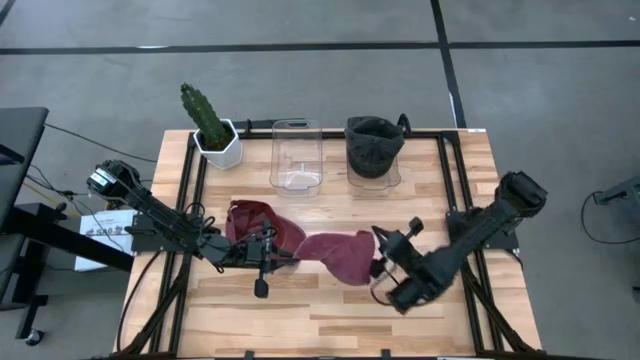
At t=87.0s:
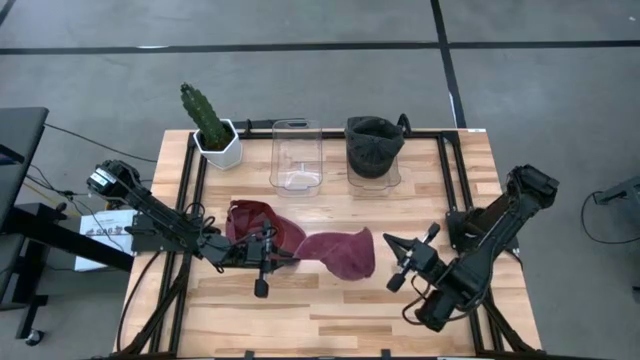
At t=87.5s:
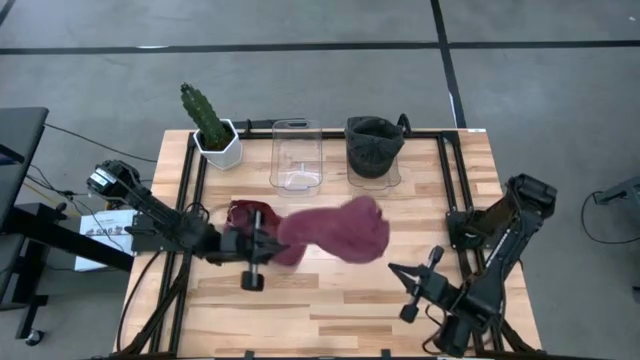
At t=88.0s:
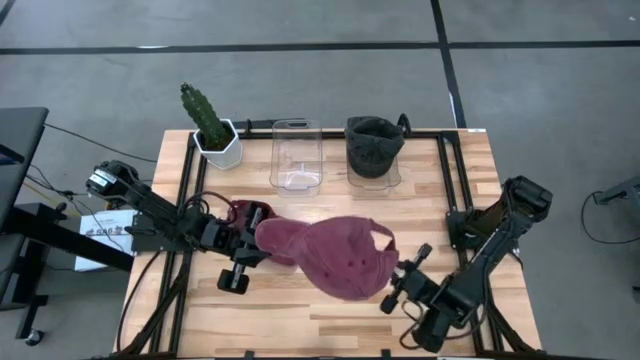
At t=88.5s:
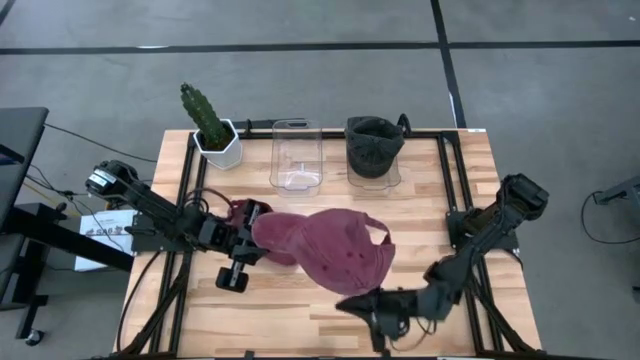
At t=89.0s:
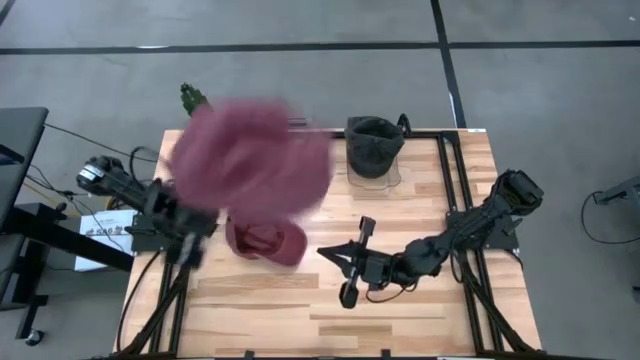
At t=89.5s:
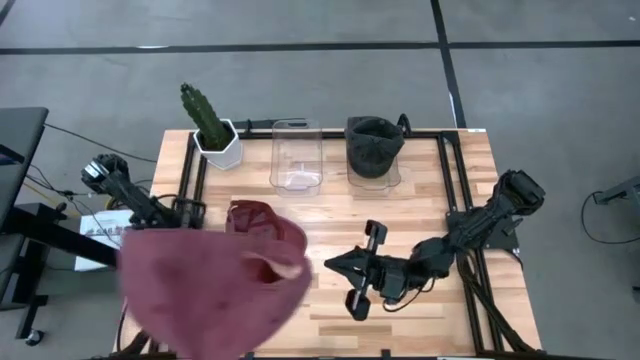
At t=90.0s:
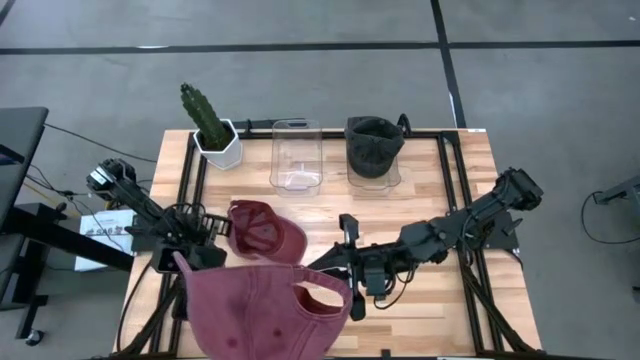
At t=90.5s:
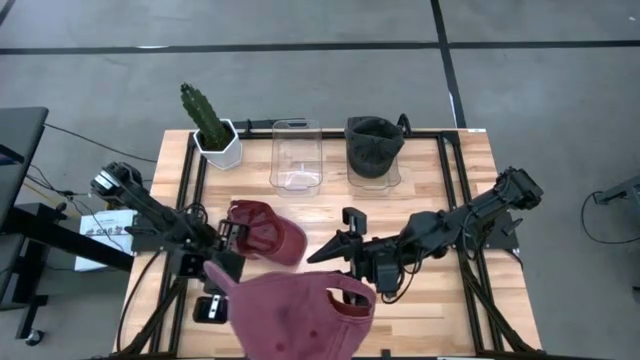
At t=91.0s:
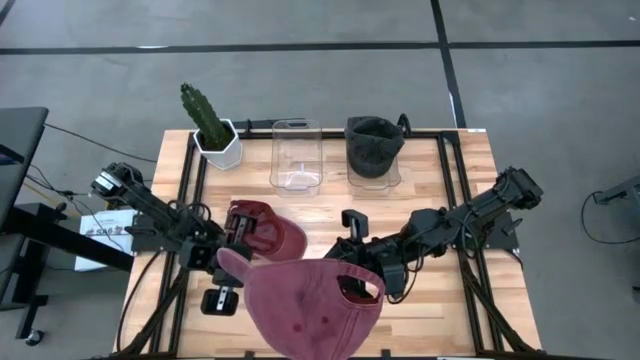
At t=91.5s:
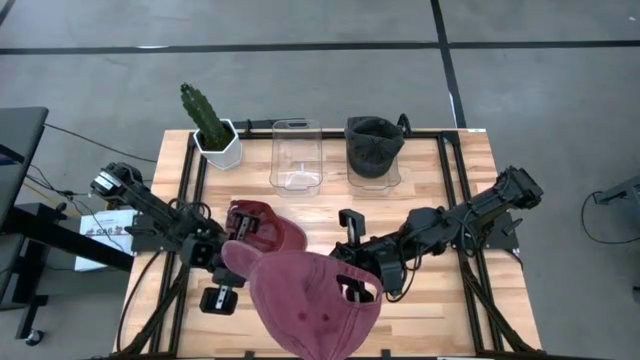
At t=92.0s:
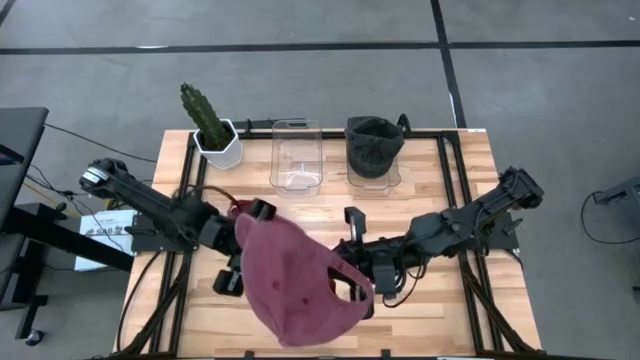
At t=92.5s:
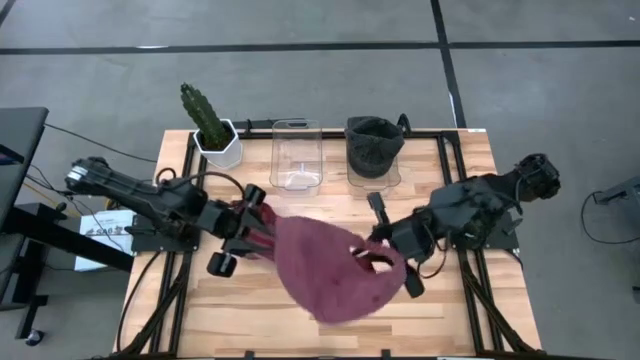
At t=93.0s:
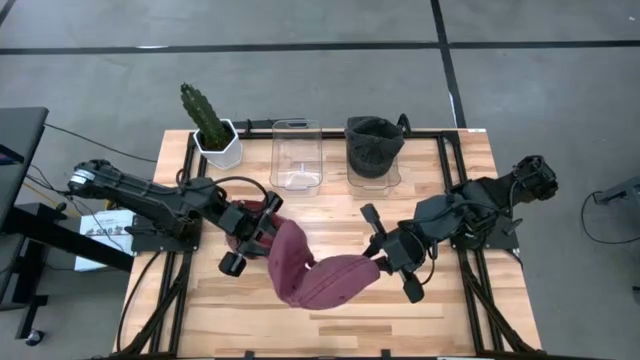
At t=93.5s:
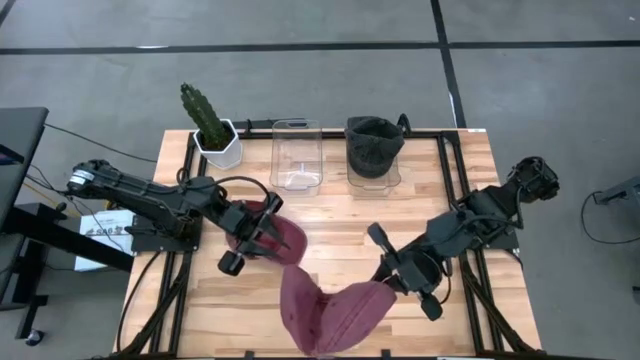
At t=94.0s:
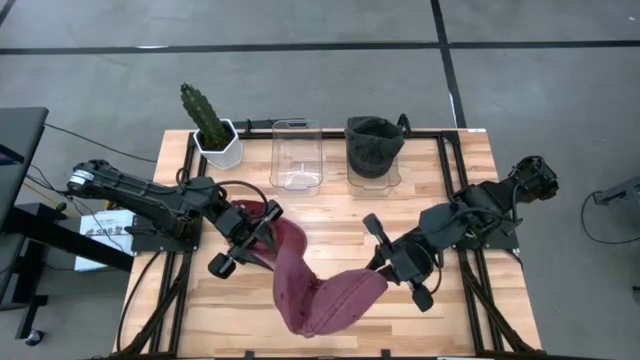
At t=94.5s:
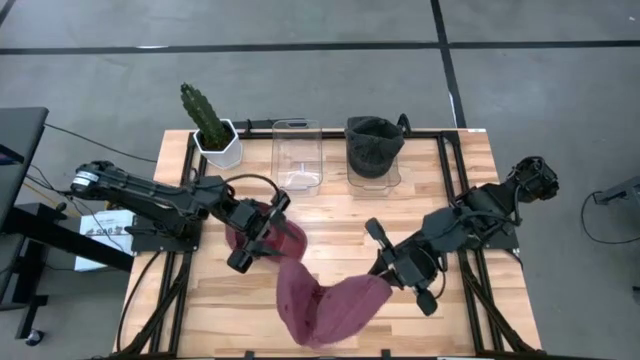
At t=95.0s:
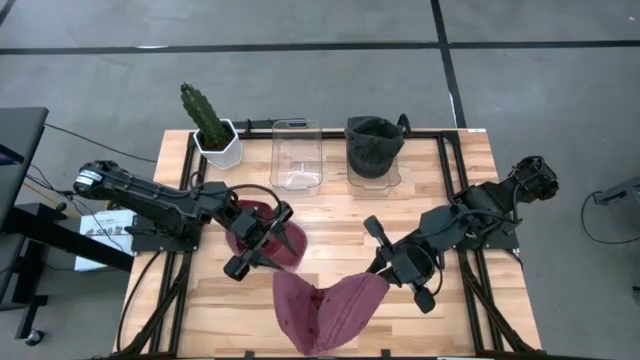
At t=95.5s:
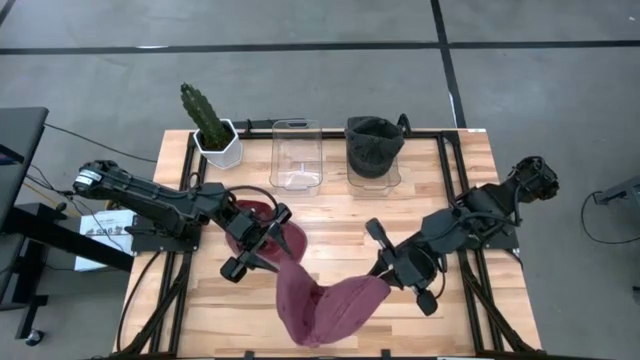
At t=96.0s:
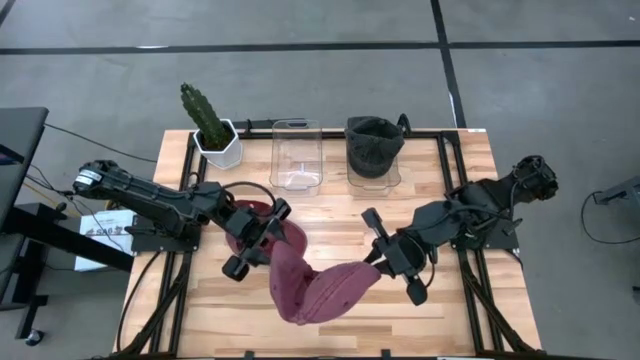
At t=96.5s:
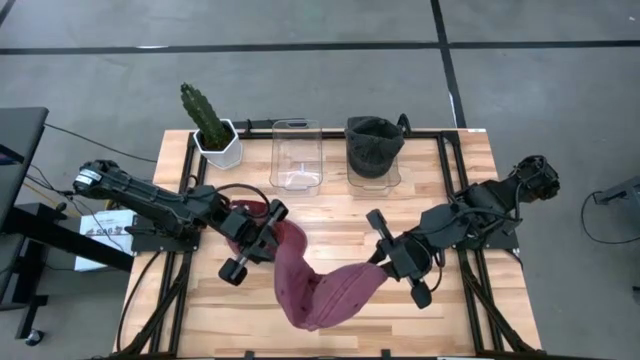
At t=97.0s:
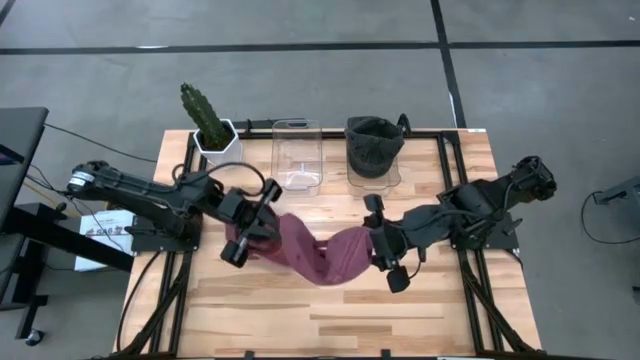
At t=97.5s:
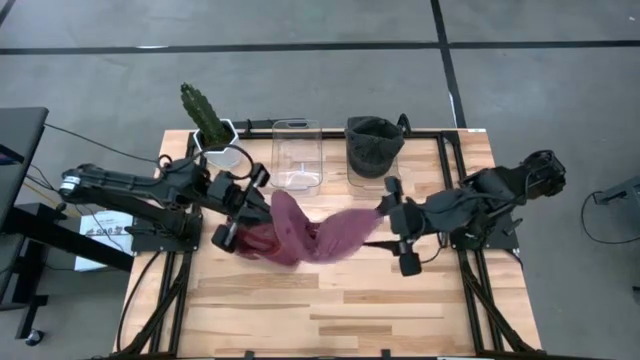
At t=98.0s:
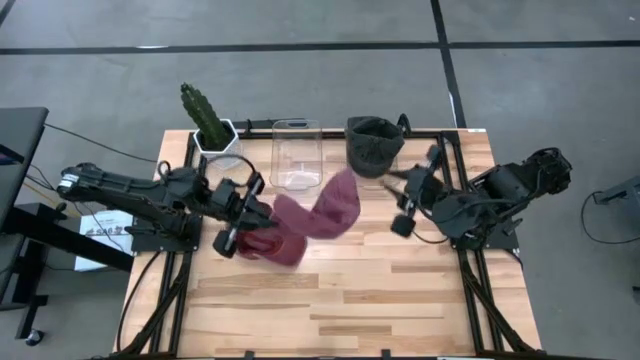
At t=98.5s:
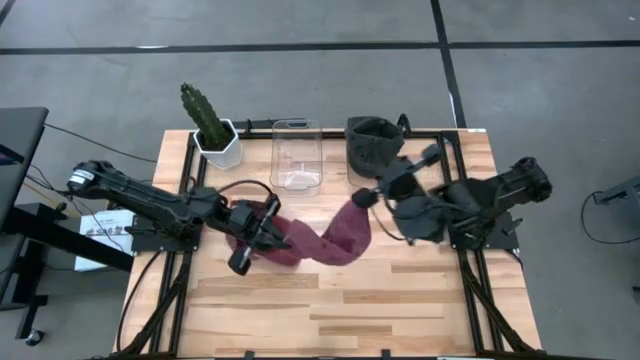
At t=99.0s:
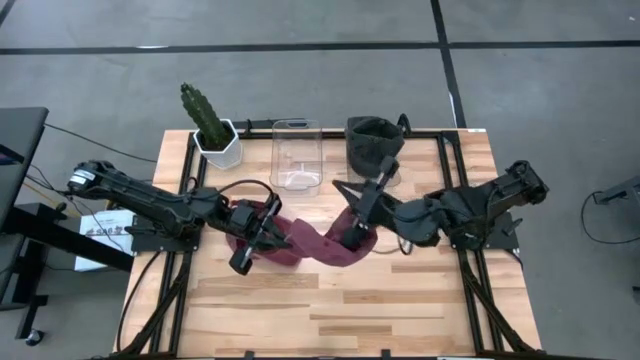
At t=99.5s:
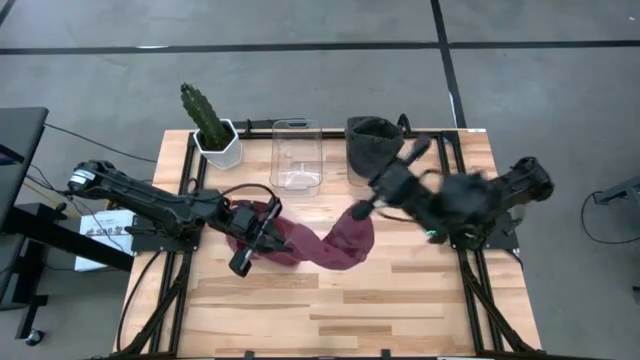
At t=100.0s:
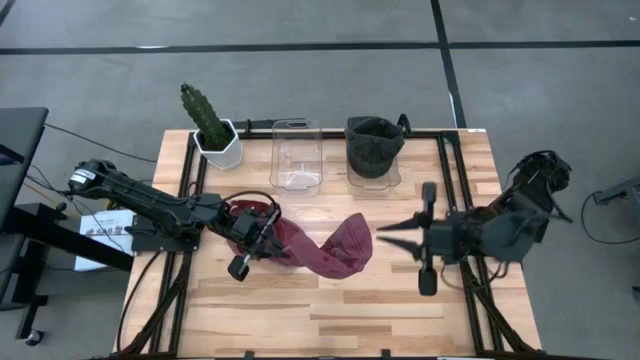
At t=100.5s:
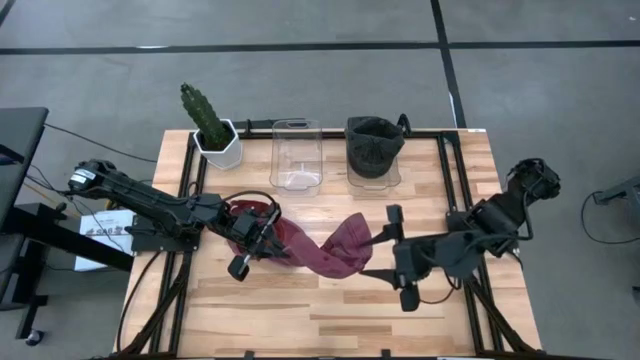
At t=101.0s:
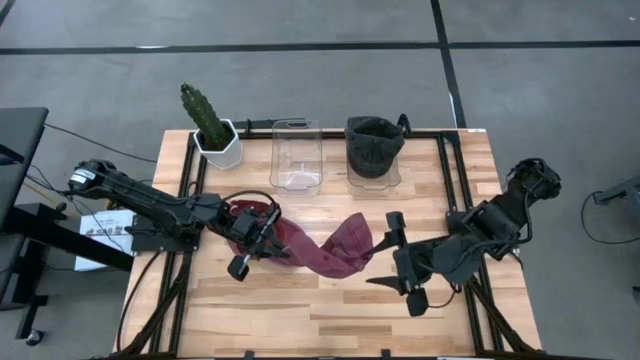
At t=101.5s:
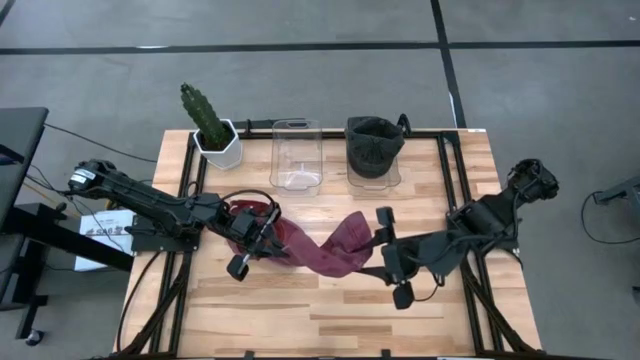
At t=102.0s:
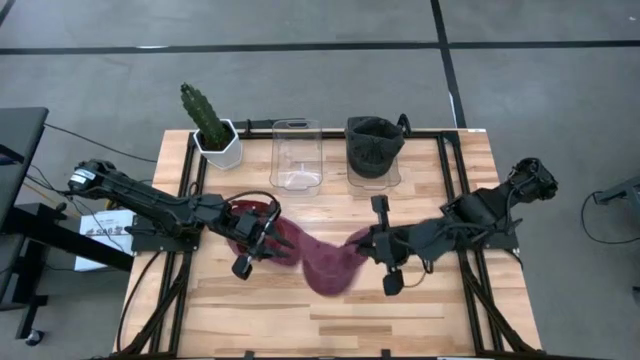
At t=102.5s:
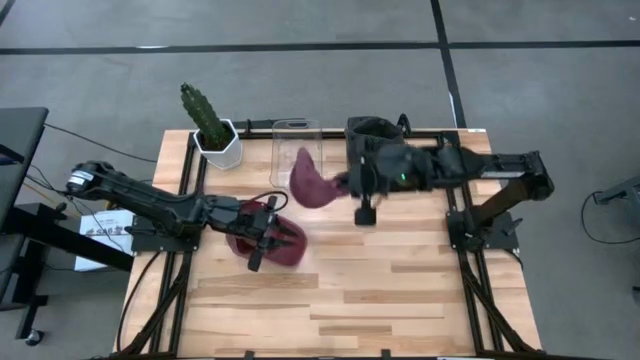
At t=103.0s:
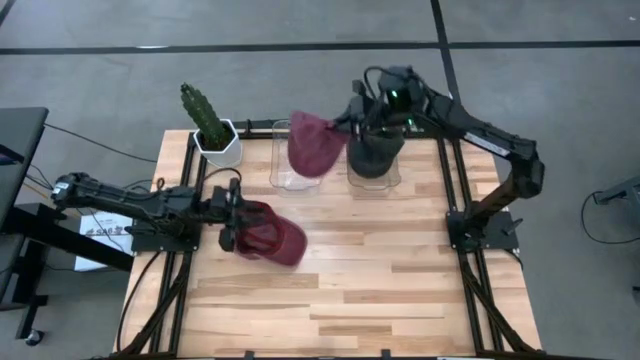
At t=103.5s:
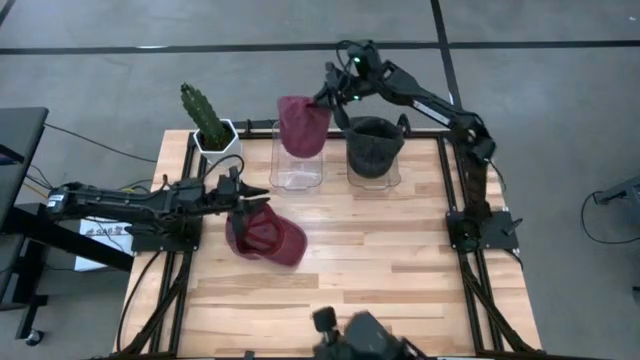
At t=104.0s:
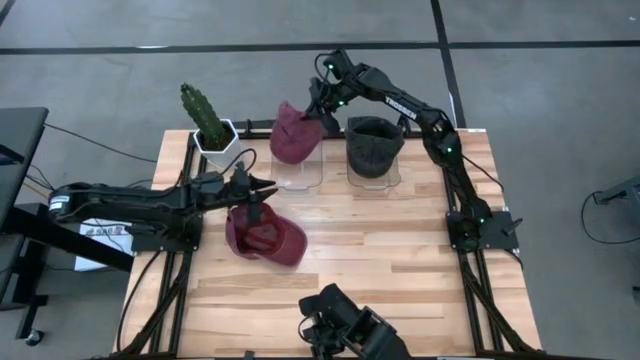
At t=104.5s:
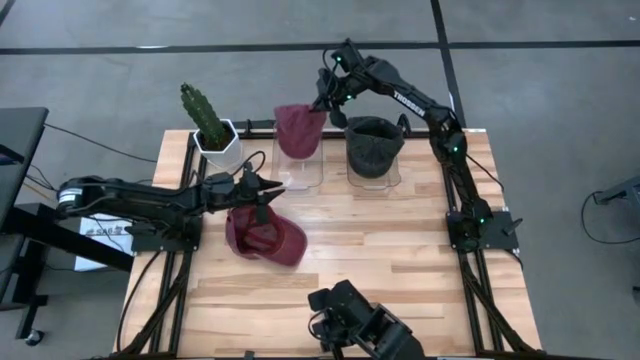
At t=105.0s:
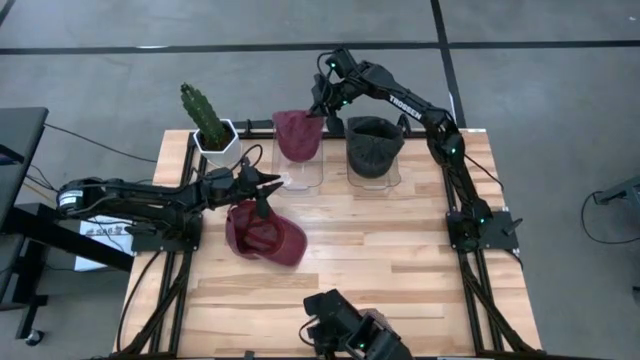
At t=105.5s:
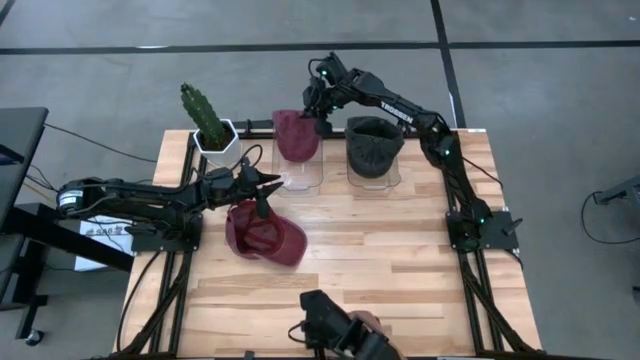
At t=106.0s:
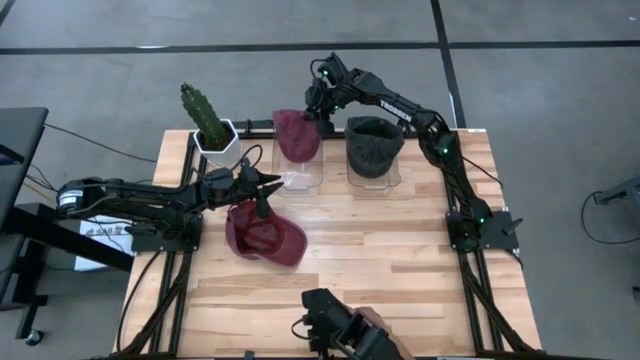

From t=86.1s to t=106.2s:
Task: Pick & Place hat
Put the right red cap into the transparent bin
